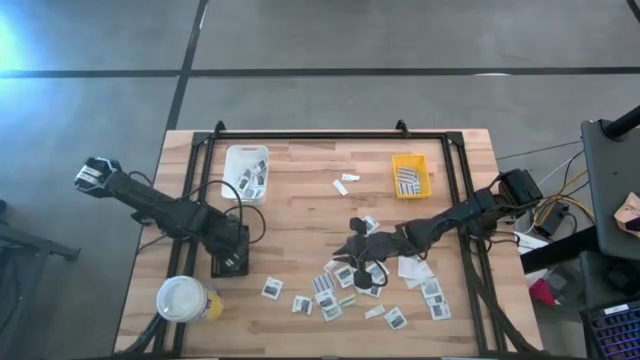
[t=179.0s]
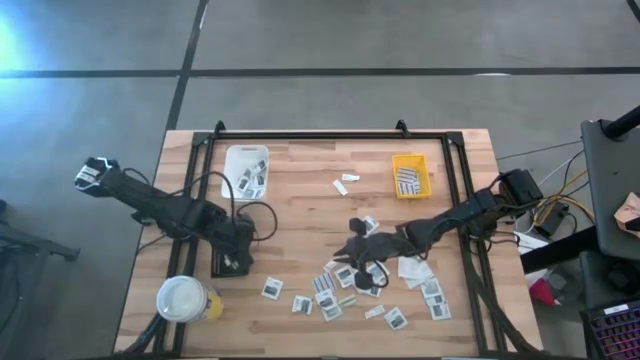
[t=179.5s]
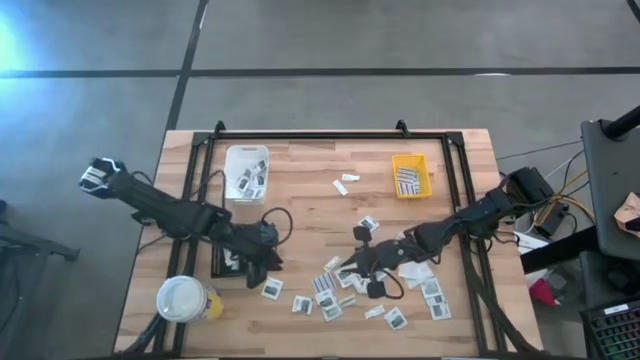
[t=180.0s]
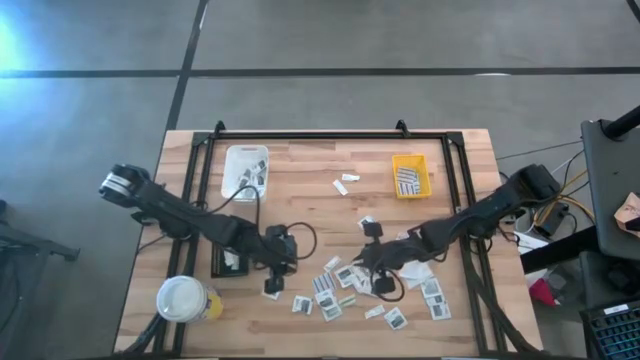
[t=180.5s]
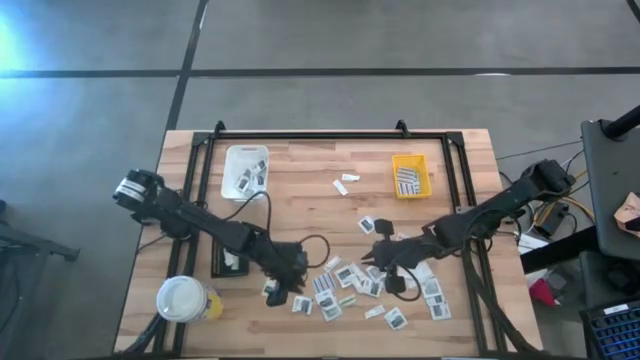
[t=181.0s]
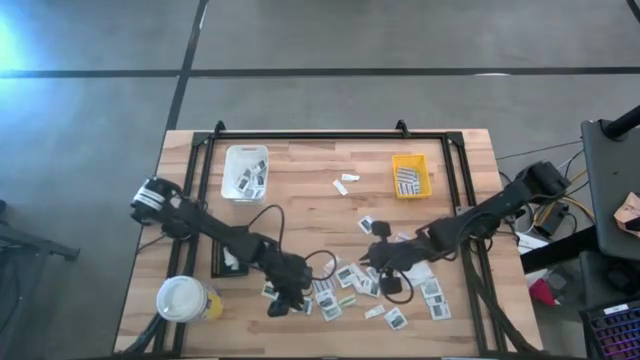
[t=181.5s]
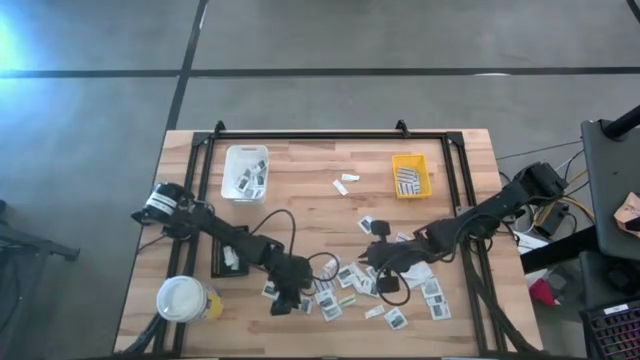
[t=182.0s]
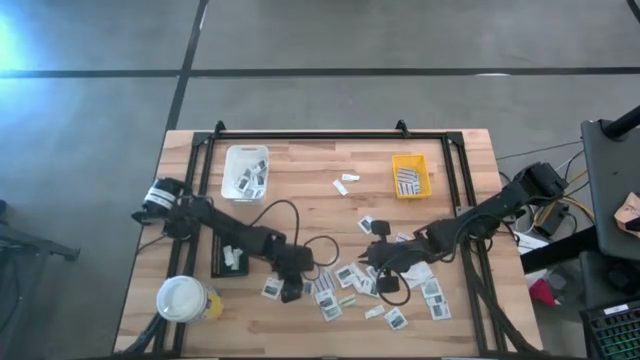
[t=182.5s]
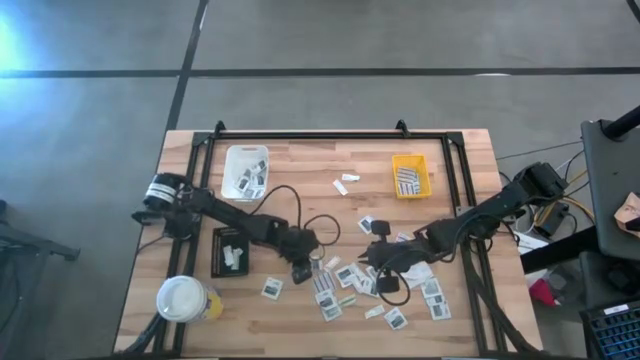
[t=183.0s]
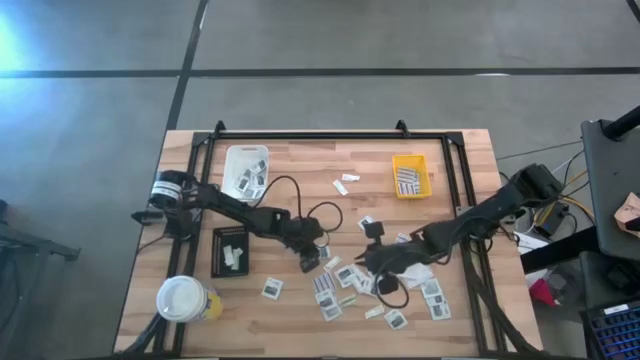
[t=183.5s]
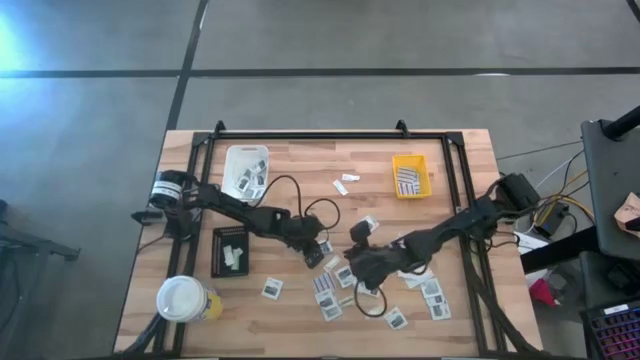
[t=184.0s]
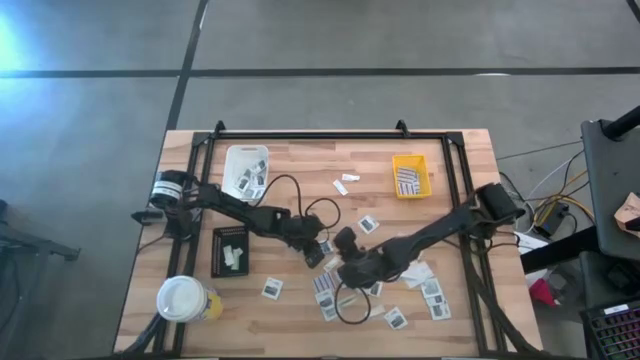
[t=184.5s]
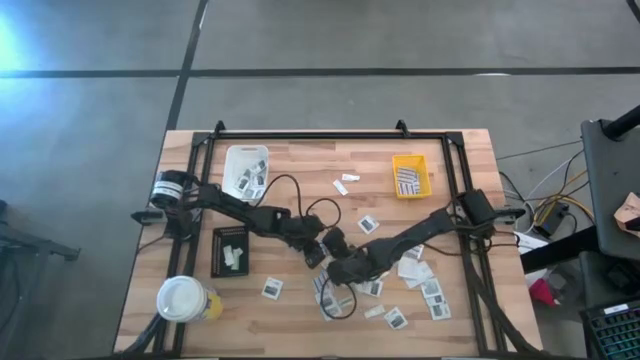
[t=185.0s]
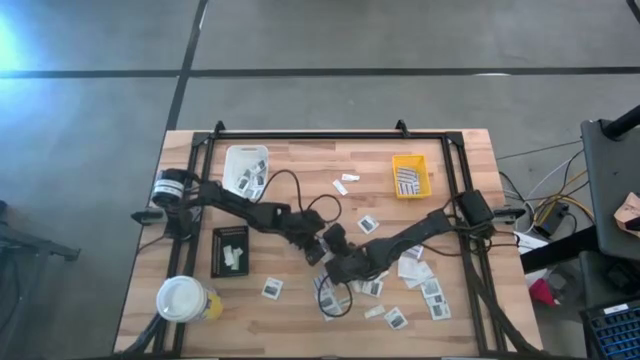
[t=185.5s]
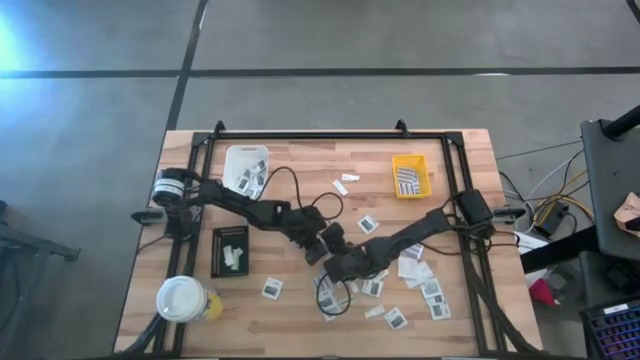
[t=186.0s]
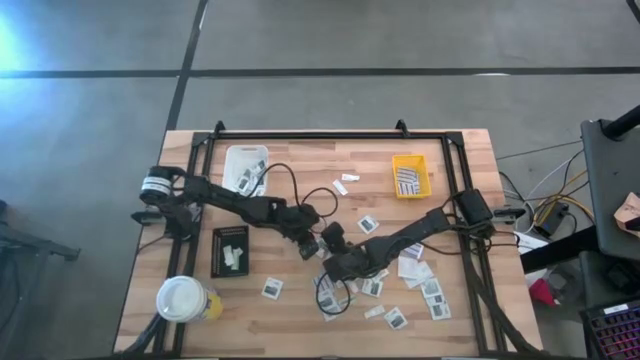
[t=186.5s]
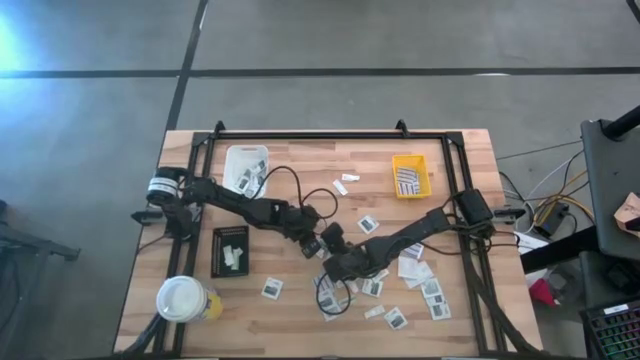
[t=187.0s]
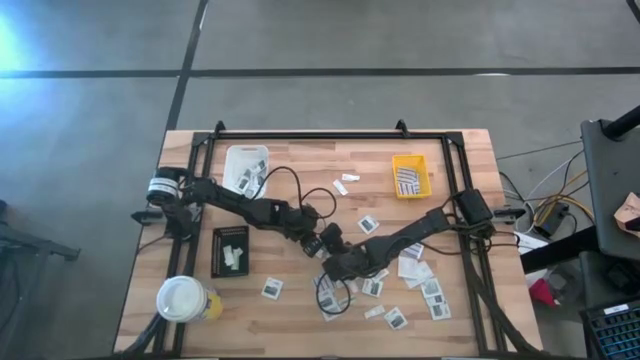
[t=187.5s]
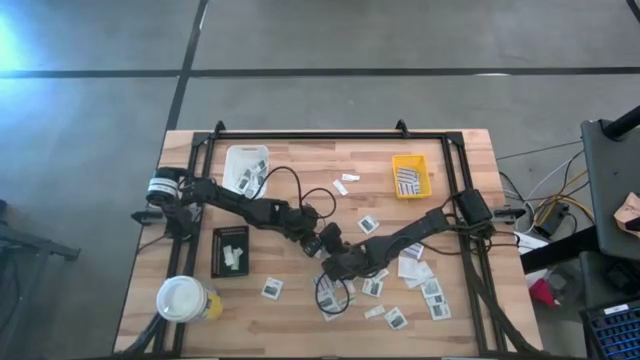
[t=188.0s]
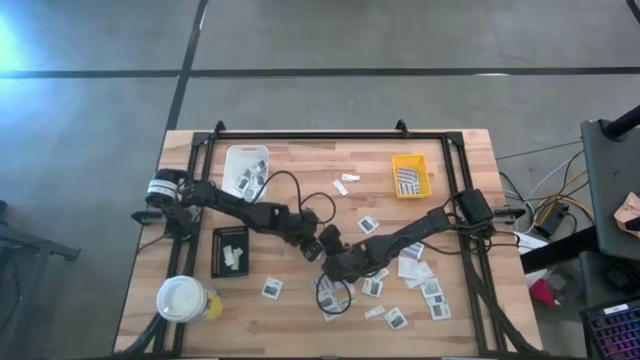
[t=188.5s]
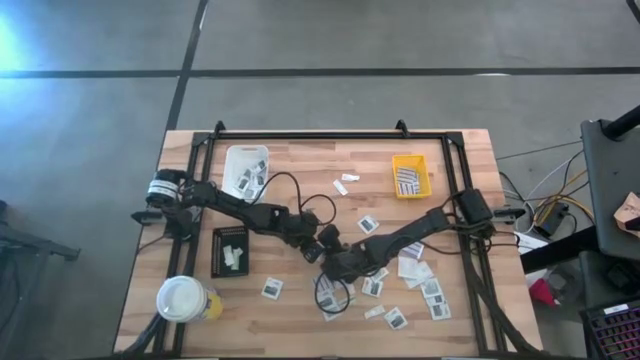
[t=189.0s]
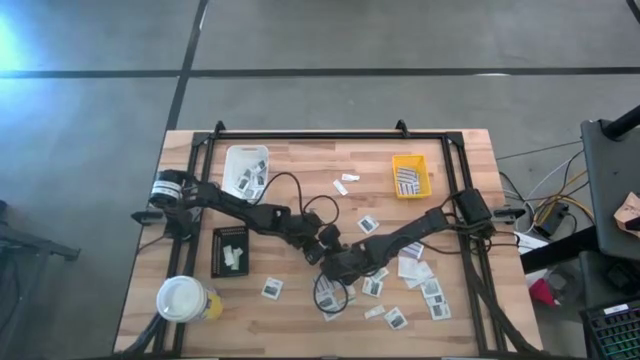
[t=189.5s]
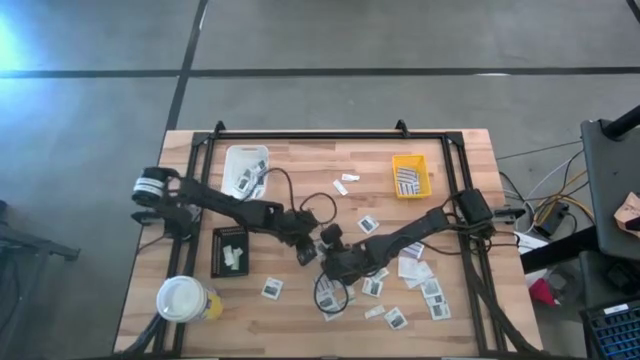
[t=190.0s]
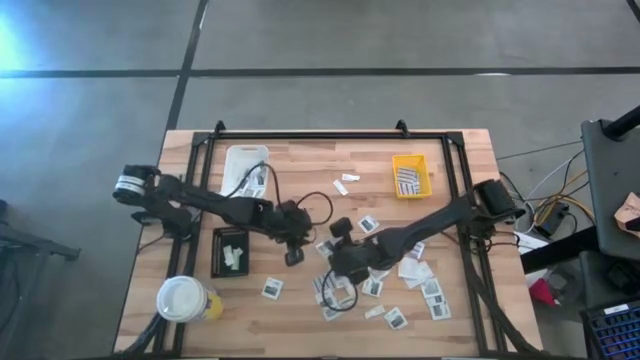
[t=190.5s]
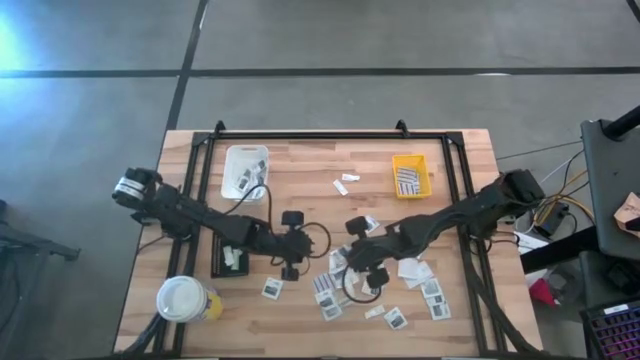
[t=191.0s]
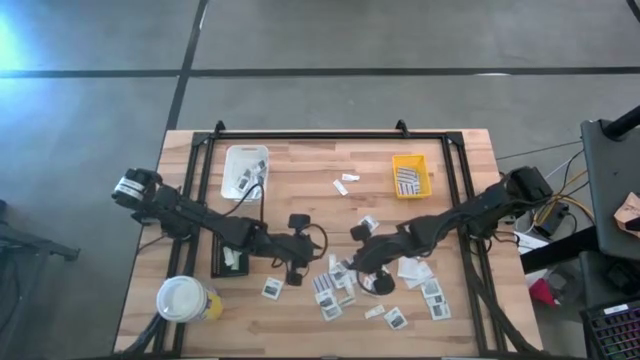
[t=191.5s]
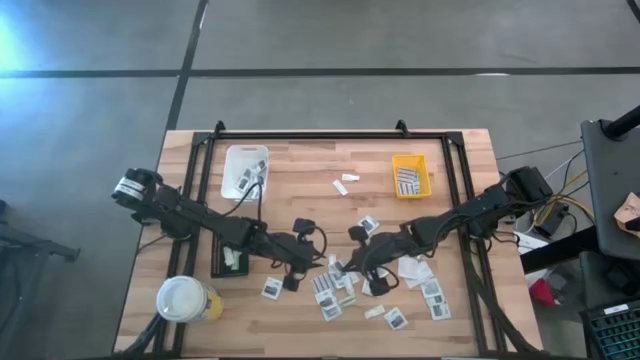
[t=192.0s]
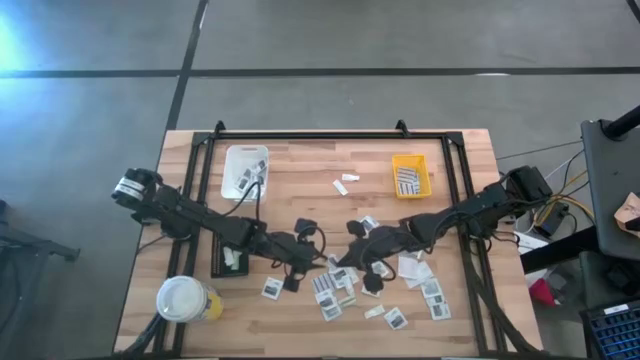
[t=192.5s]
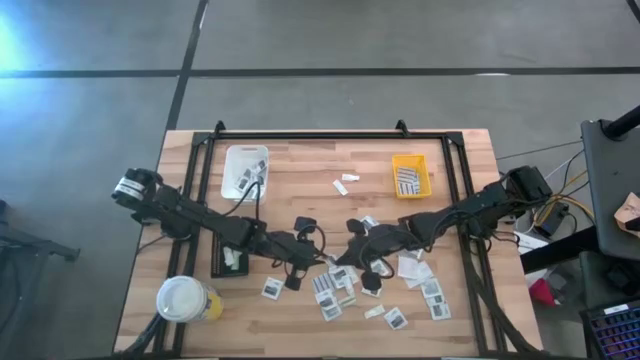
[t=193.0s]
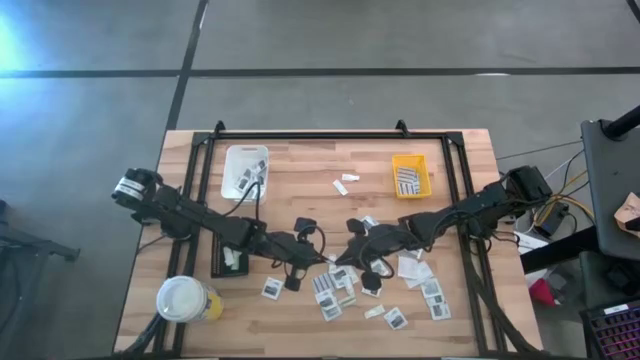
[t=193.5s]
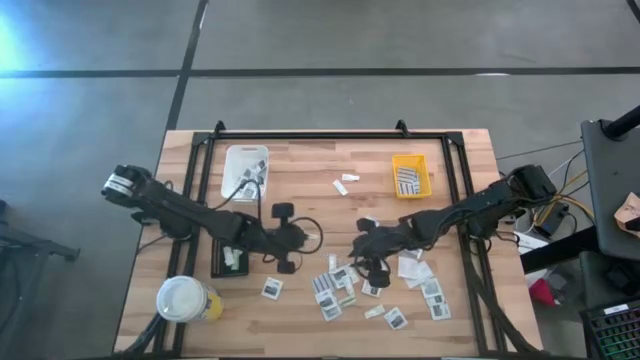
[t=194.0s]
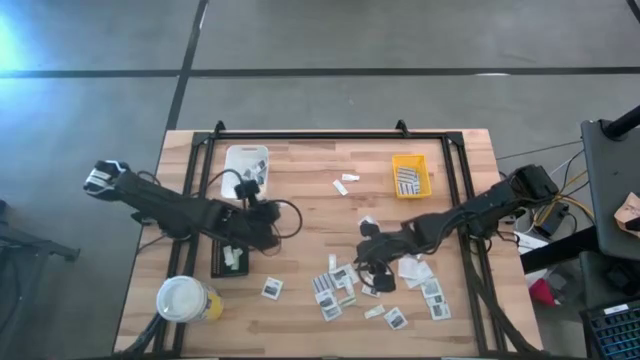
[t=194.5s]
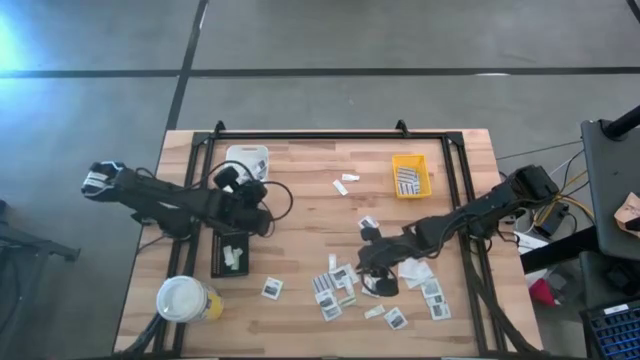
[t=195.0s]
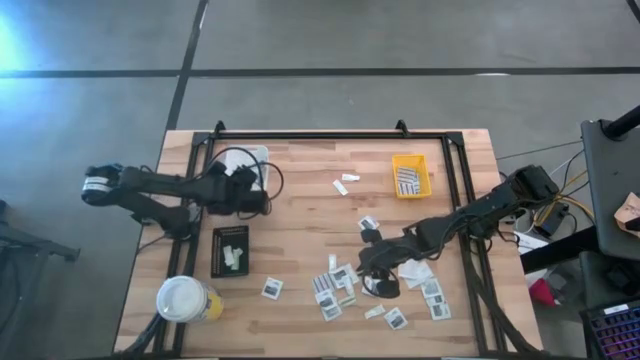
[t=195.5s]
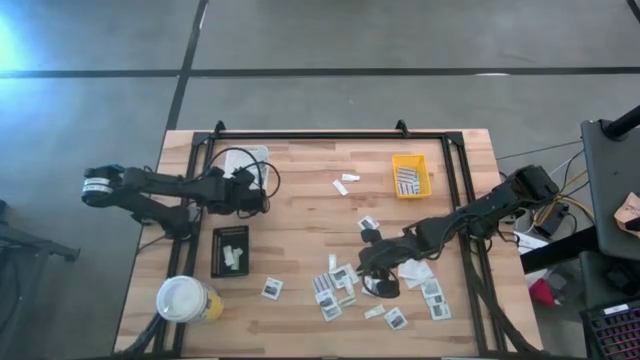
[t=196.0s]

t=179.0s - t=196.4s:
Task: Pick & Place First Aid Supplies
Put the gray towelette pack into the white bin

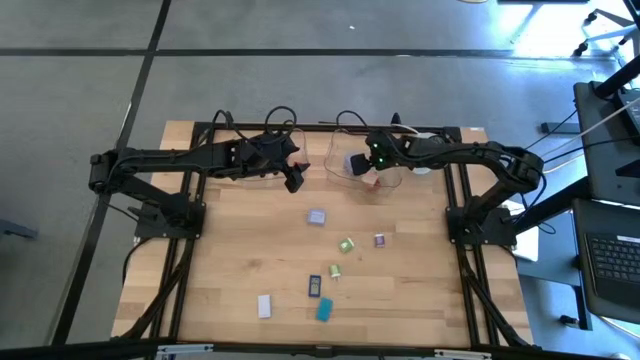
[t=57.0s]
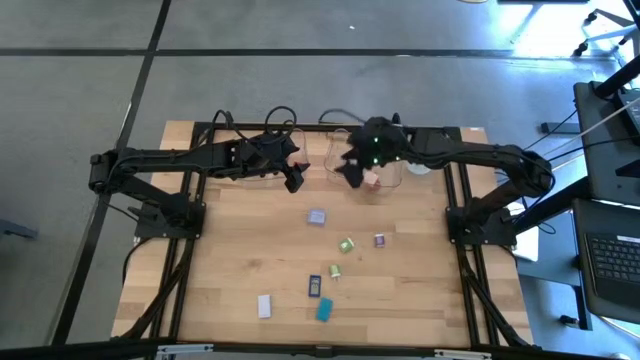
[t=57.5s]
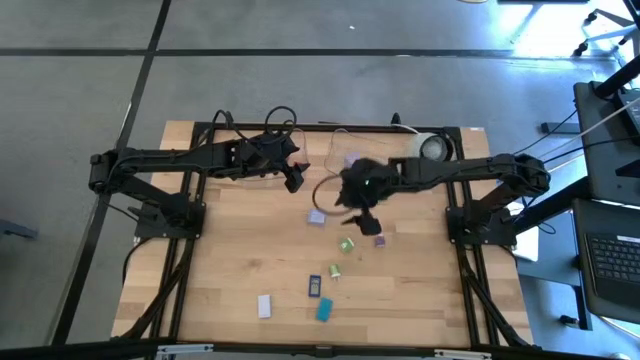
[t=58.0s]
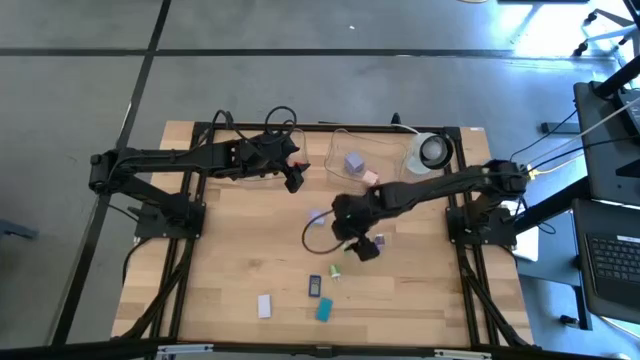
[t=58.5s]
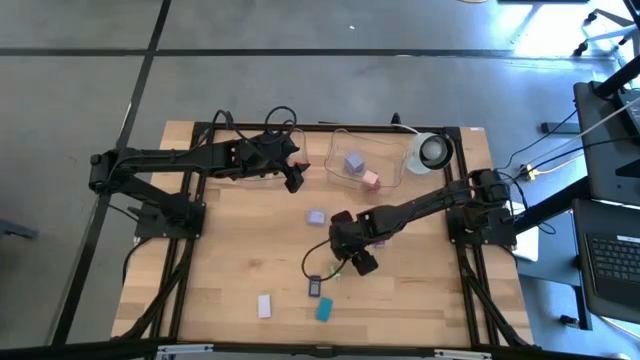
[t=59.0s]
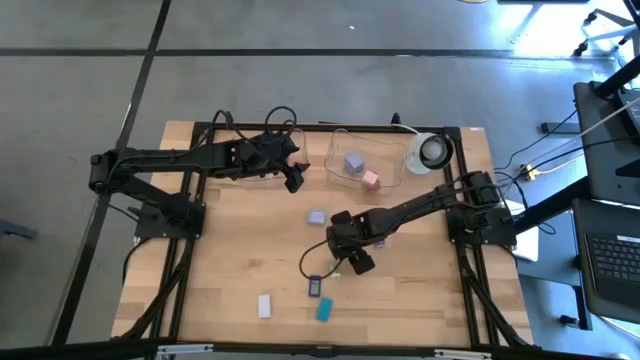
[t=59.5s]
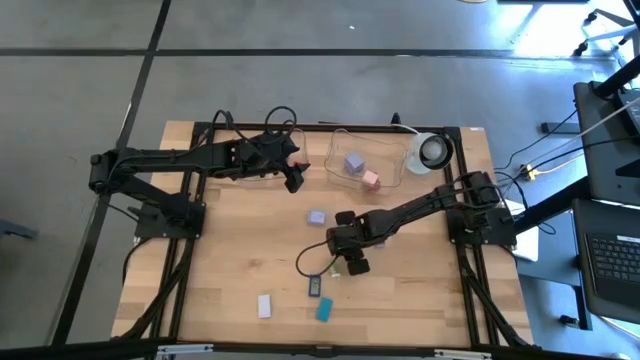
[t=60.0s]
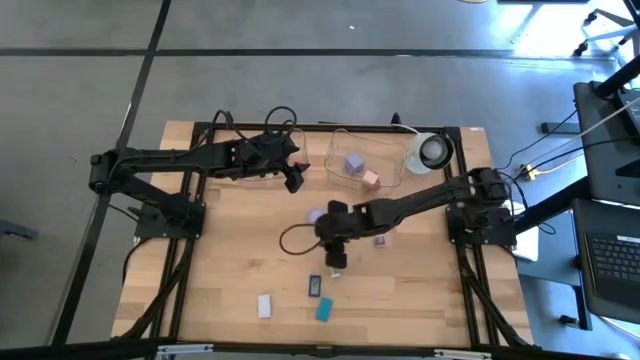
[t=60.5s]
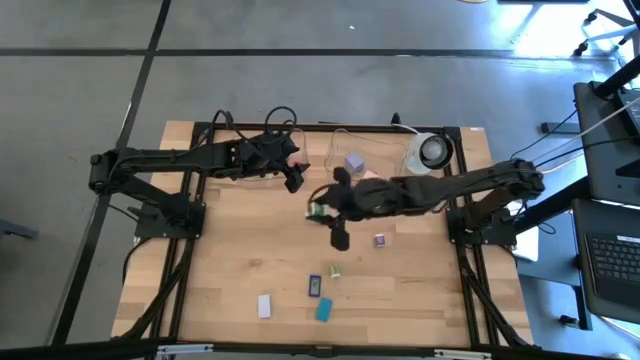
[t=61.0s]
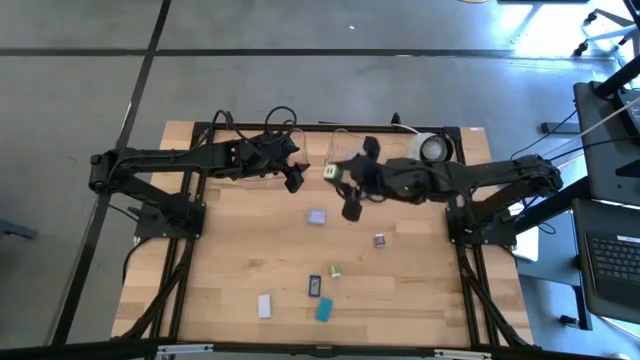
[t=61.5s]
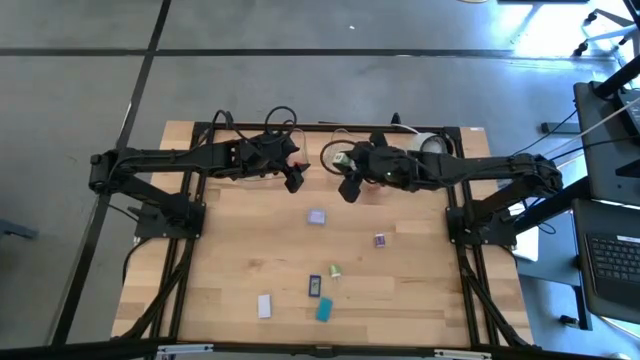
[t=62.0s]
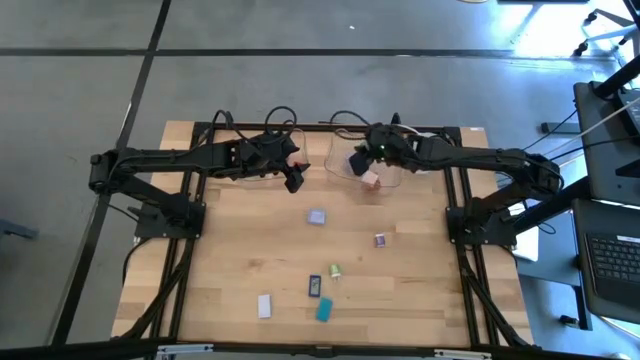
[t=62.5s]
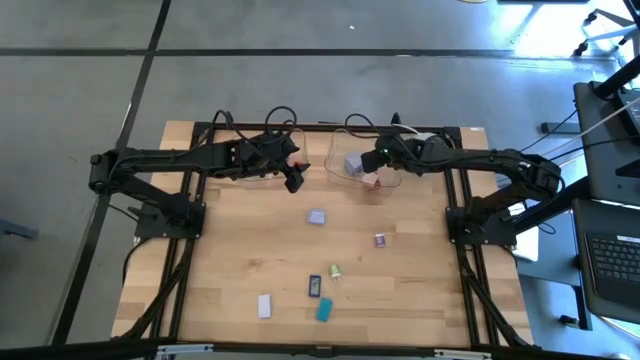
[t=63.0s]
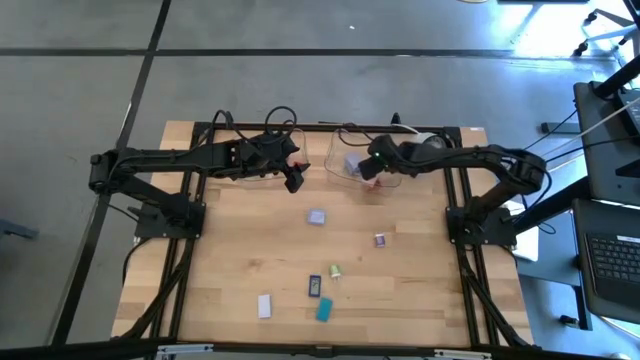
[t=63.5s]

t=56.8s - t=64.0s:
Task: Pick & Place Office items
Put the top green charger adapter into the right transparent bin
